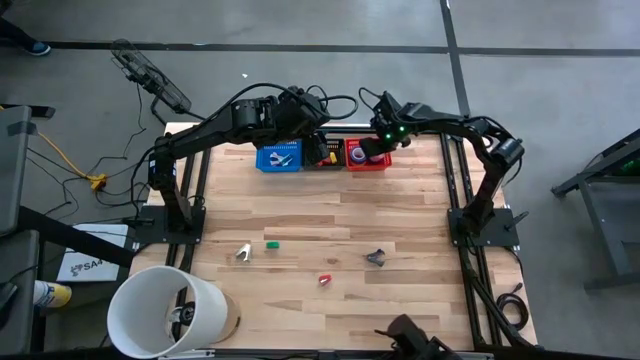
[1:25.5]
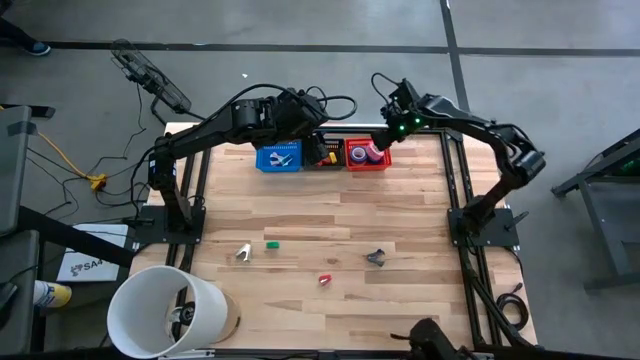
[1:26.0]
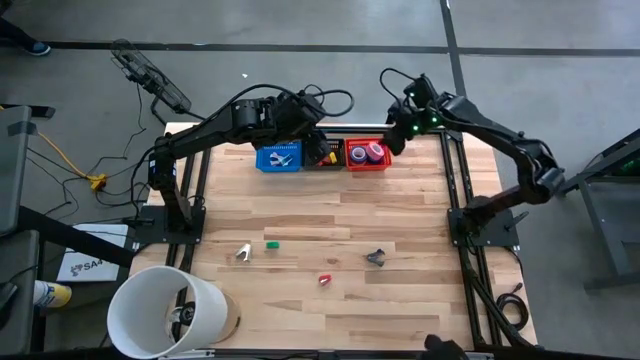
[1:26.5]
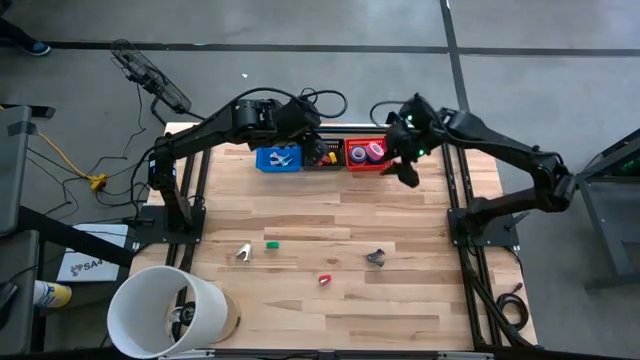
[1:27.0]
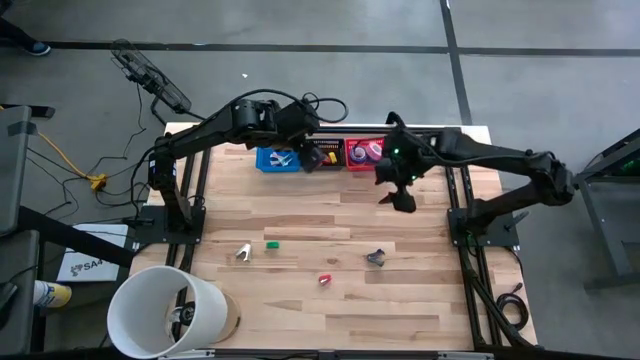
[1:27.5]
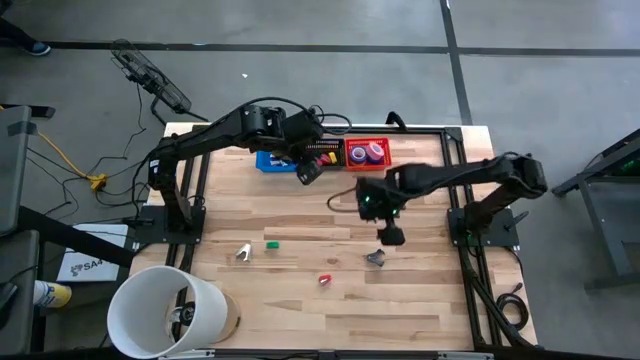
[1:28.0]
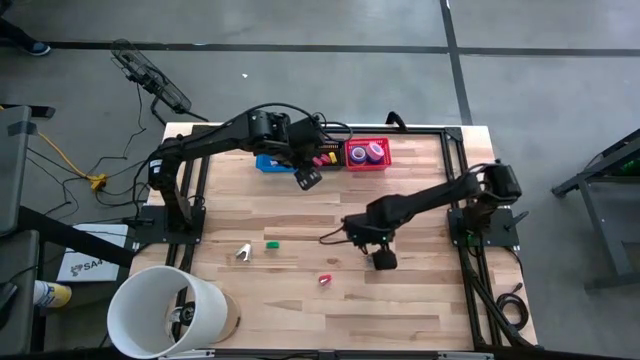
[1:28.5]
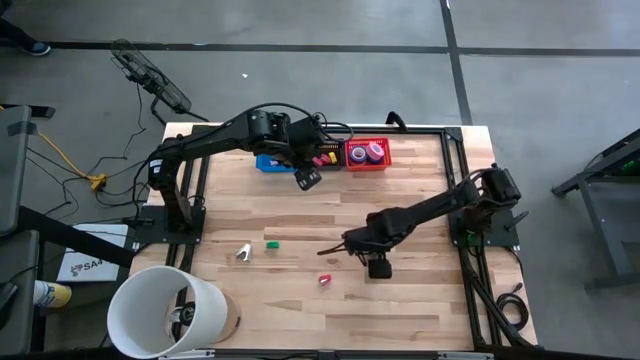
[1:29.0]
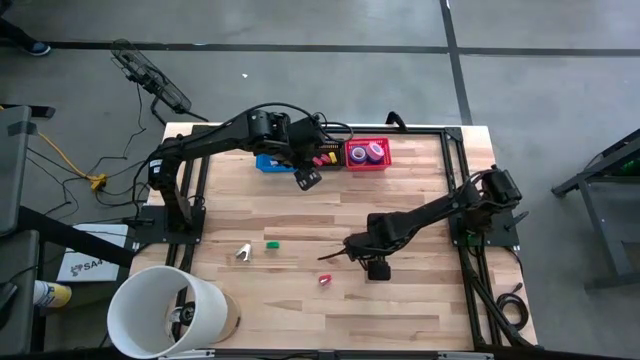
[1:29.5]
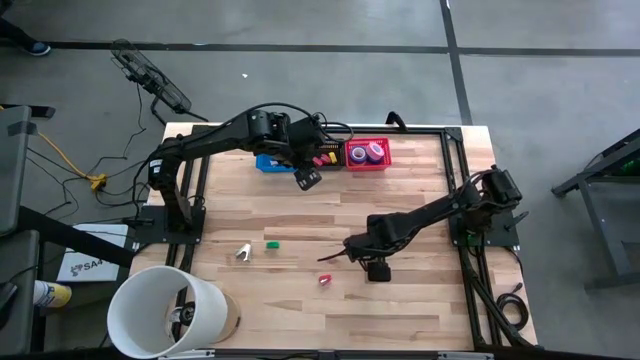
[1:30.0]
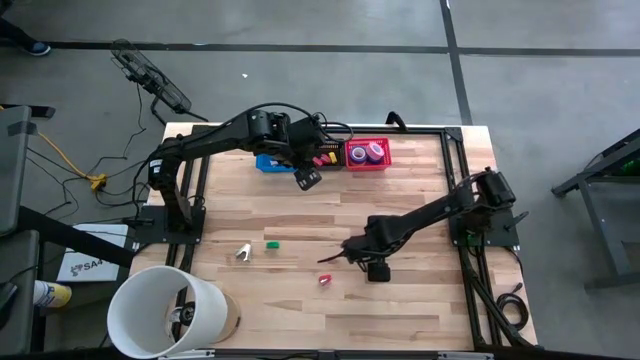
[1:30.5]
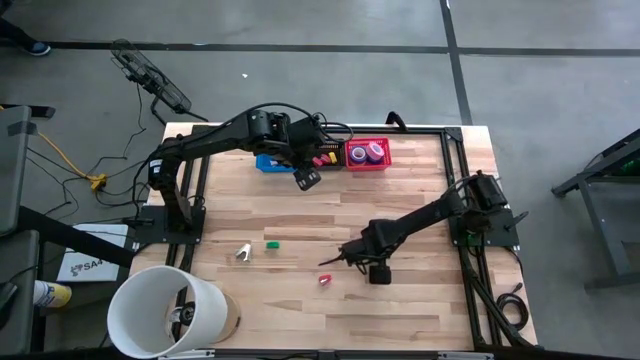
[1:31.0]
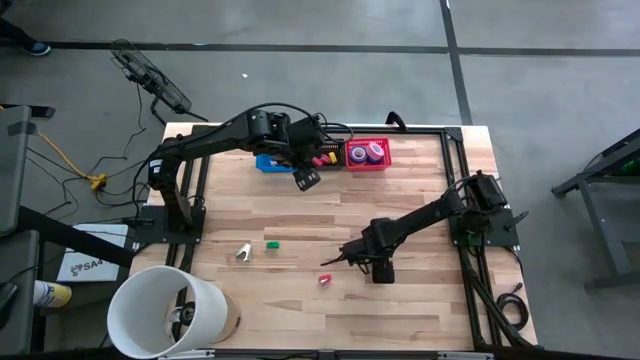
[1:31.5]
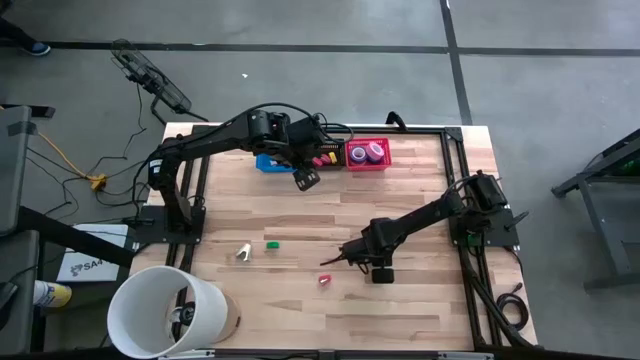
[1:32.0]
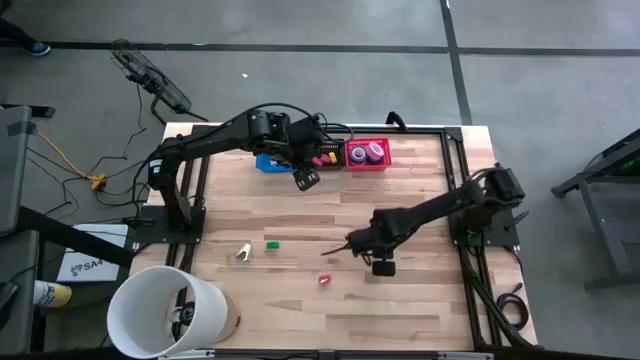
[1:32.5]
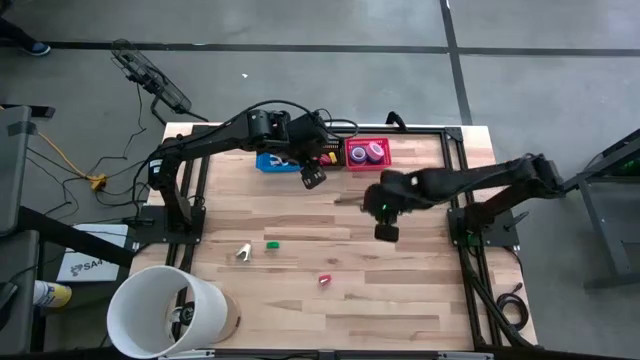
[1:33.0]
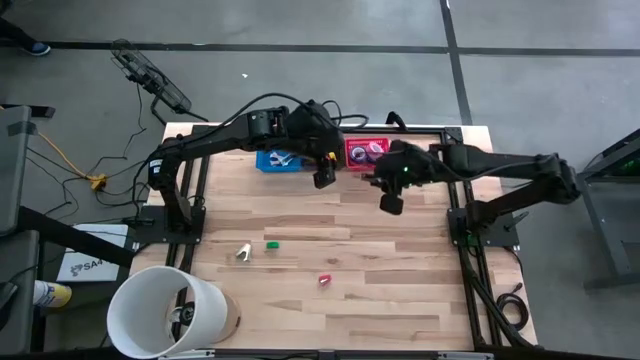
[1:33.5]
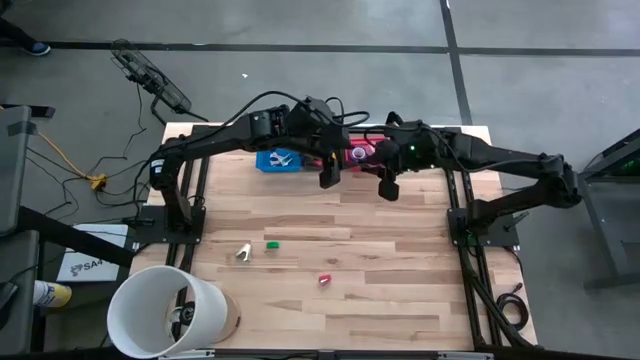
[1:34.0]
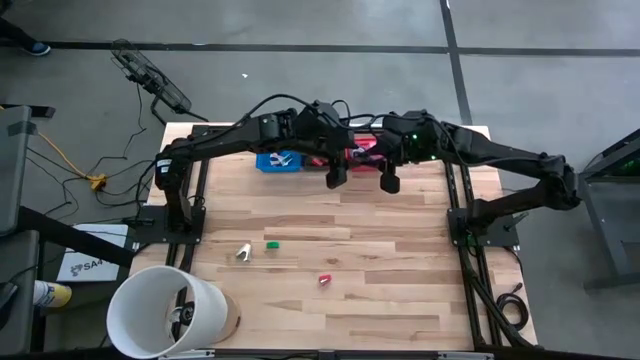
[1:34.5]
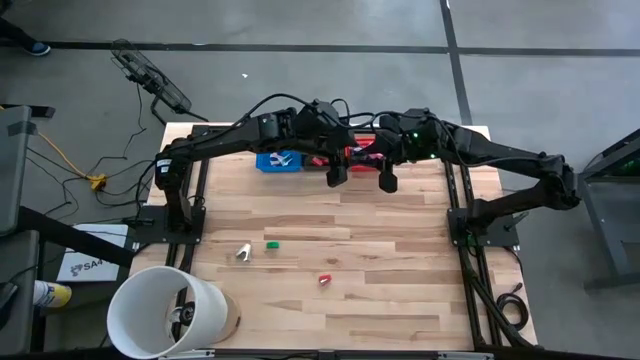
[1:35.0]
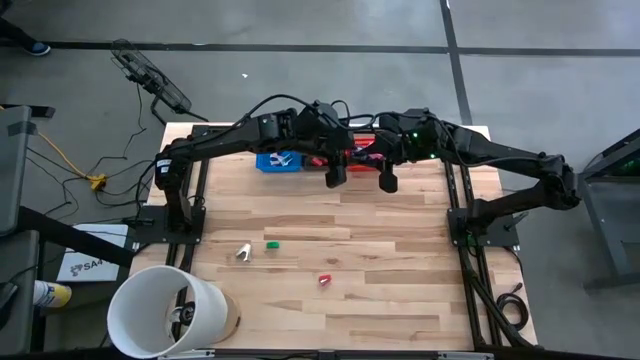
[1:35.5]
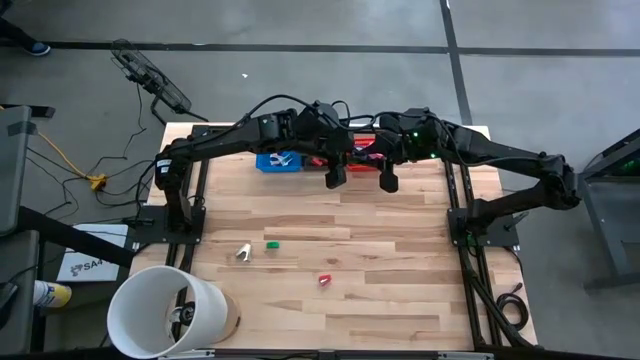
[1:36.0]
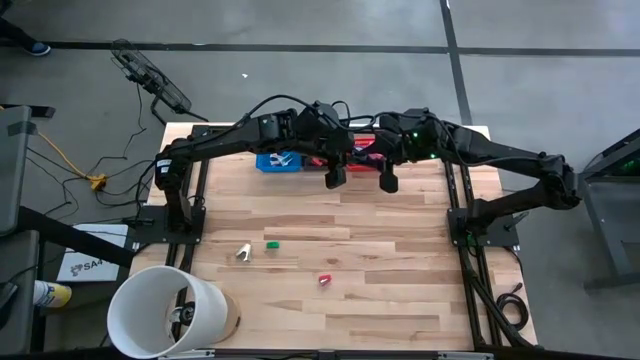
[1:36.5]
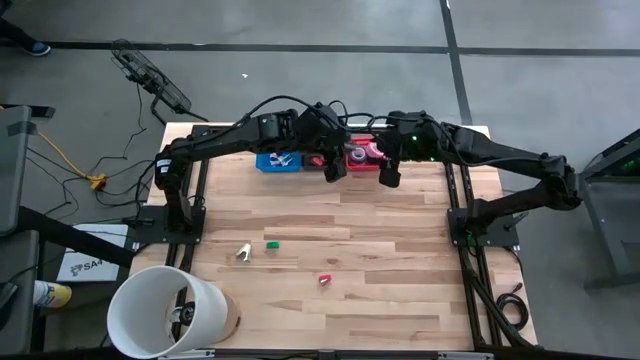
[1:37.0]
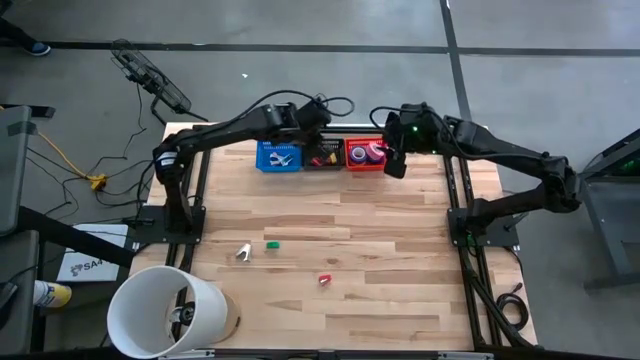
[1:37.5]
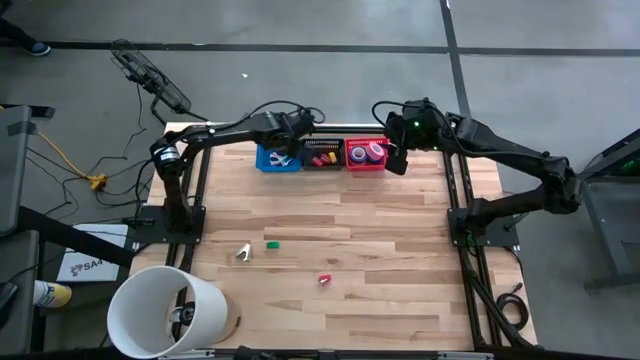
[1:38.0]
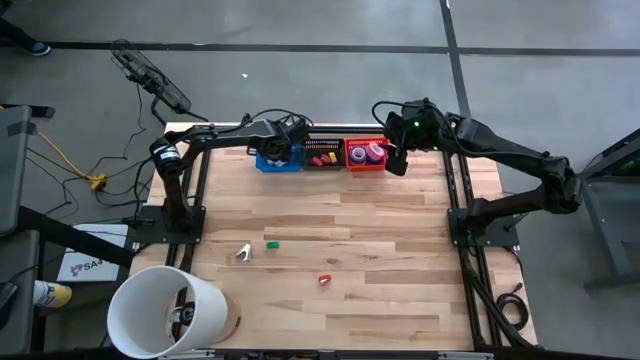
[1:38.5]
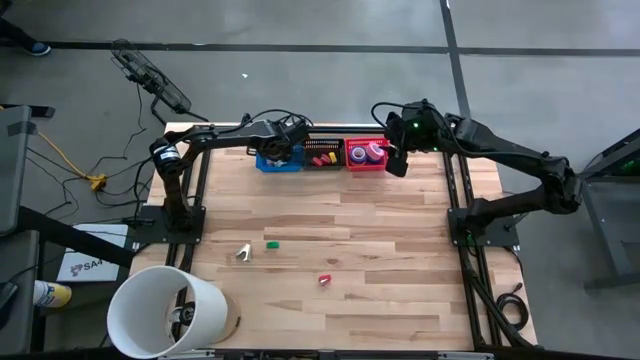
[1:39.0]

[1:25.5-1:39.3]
Task: Pick and place Stapler, Stapler remover, tape
Put the black staple remover into the blue bin

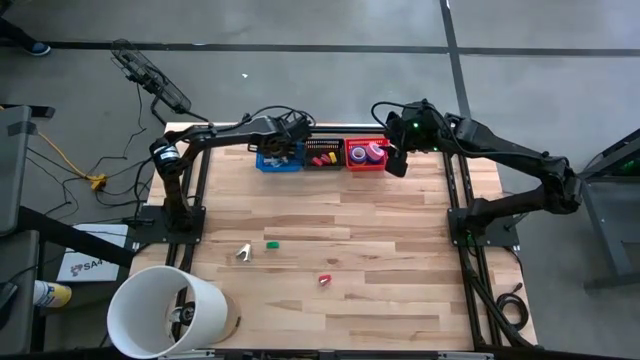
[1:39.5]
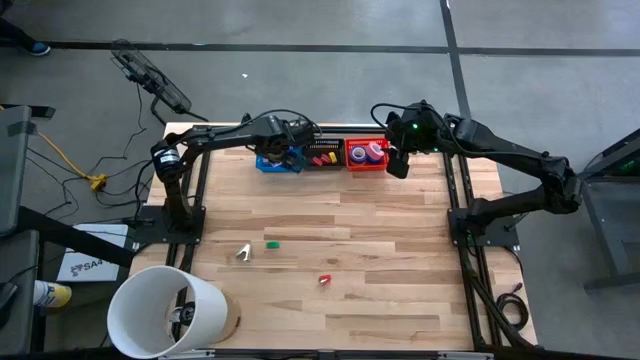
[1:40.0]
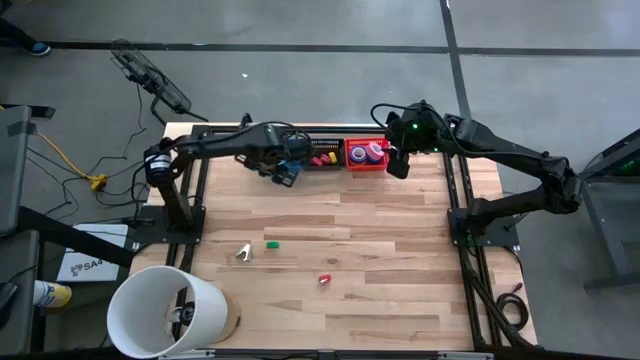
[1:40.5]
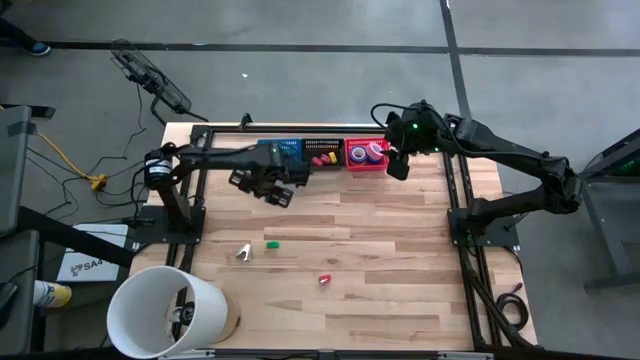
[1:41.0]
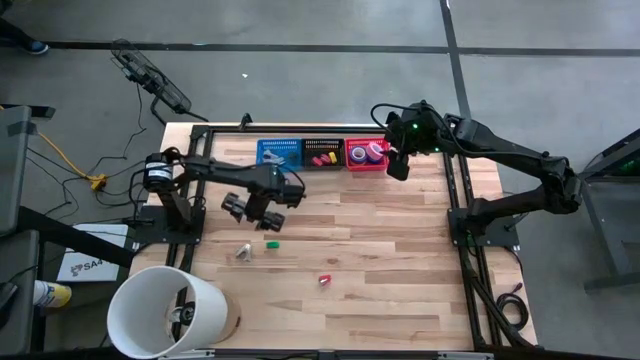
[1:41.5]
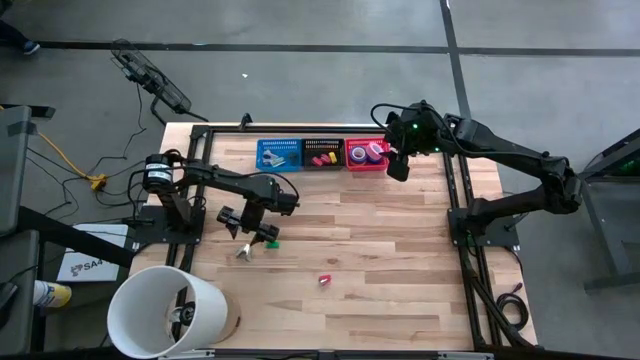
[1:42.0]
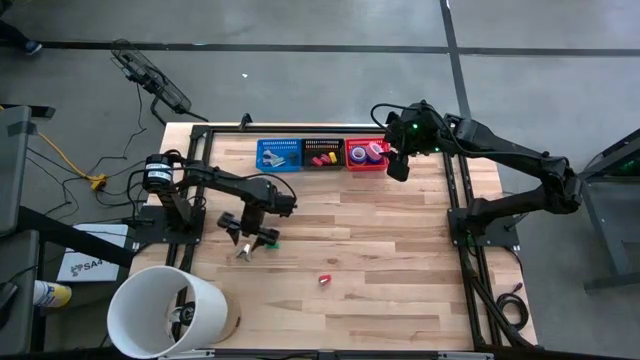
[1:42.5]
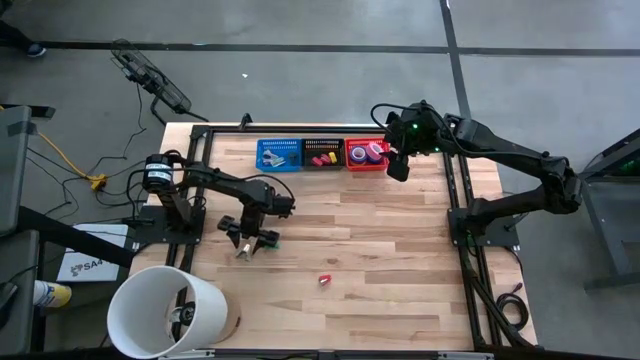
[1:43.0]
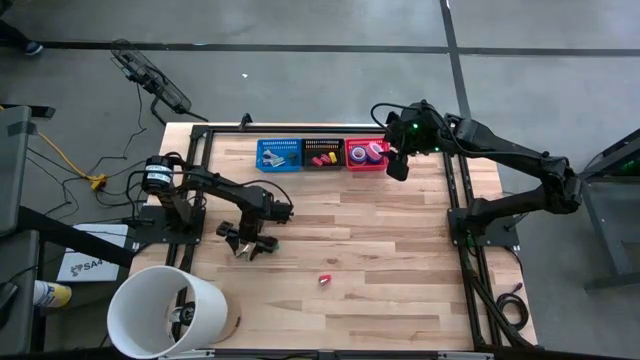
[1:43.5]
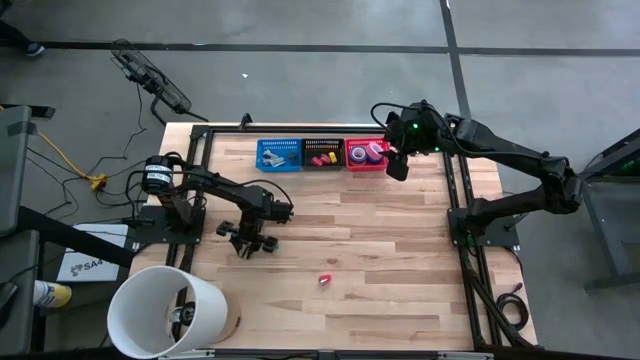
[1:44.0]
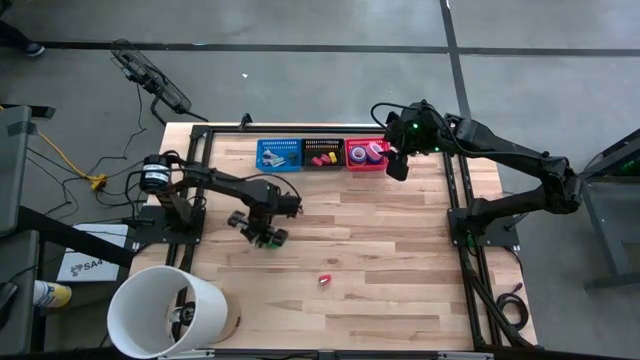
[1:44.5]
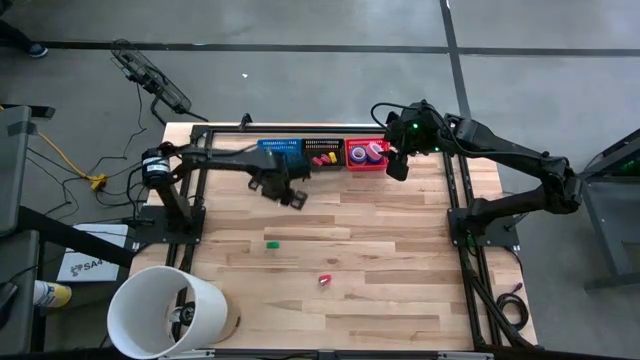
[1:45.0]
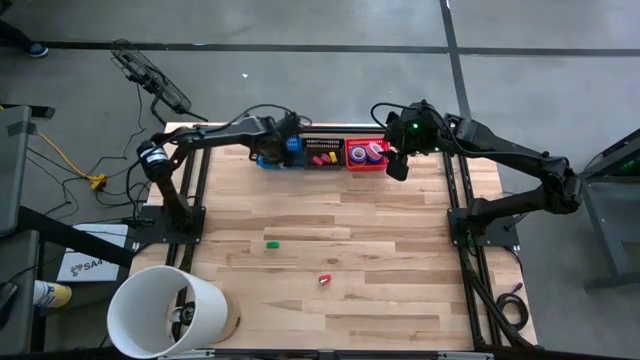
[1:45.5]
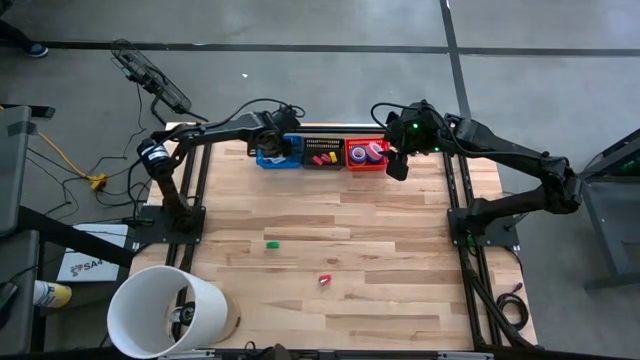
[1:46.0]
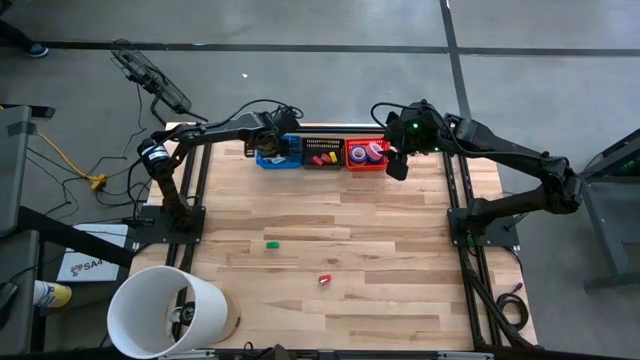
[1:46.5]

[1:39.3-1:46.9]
Put the gray staple remover into the blue bin

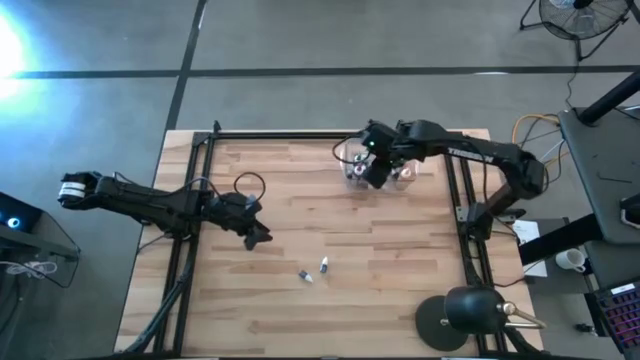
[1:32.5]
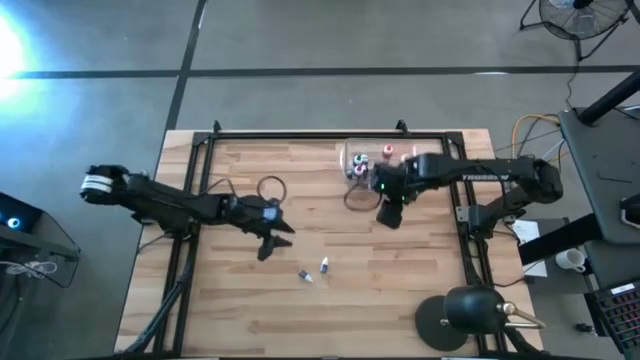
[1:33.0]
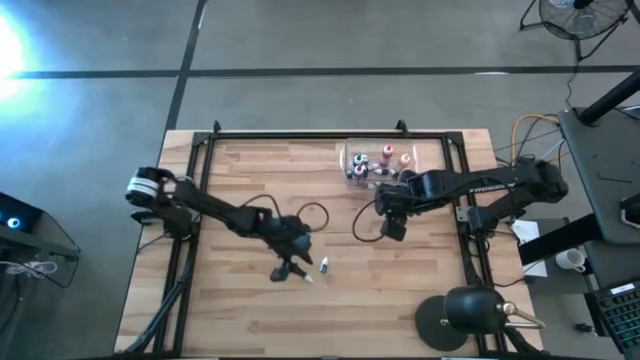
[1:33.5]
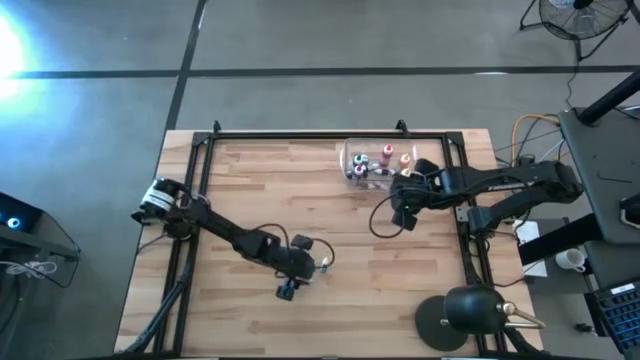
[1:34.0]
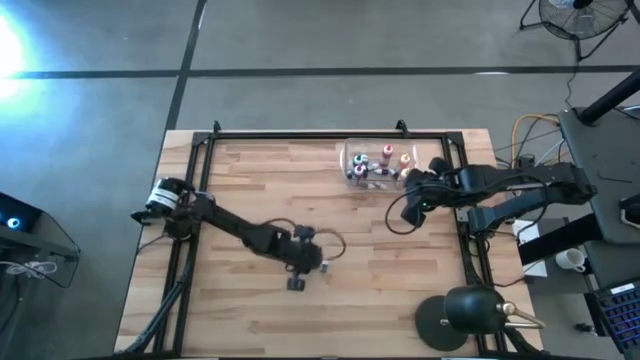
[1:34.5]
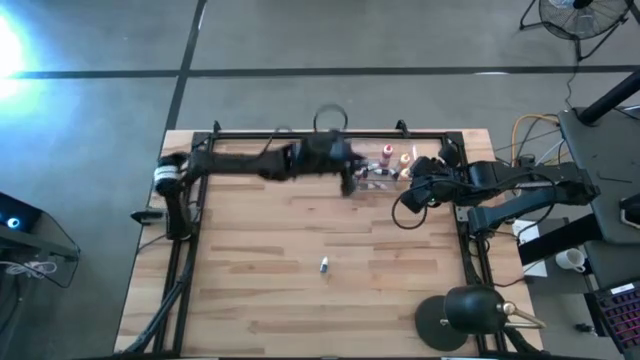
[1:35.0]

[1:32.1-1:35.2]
Task: Pick & Place food coloring
Put the small purple food coloring bottle into the transparent bin
